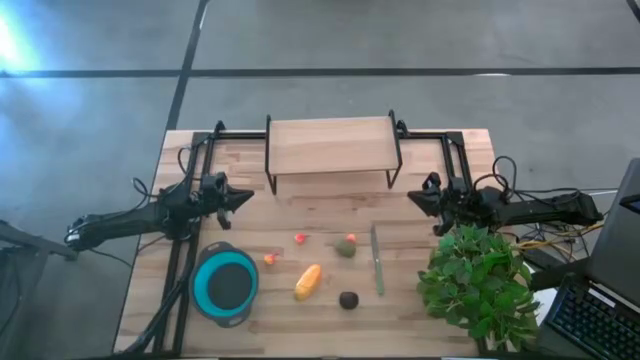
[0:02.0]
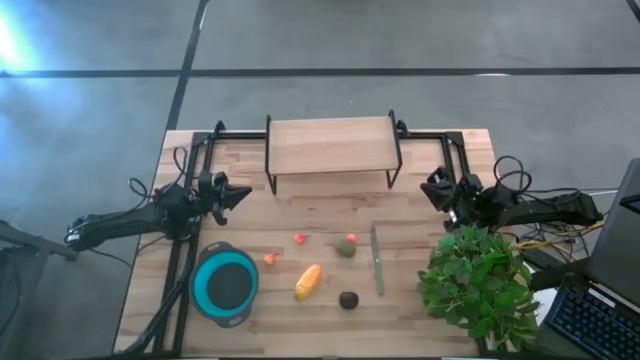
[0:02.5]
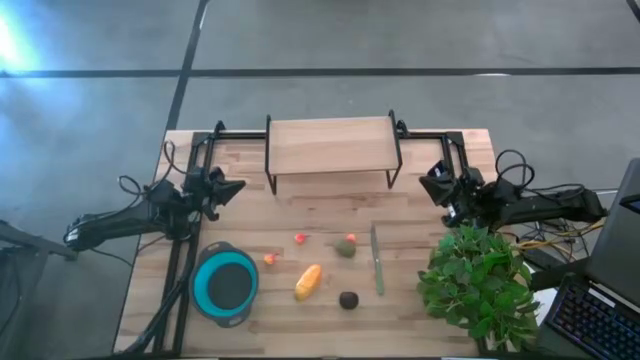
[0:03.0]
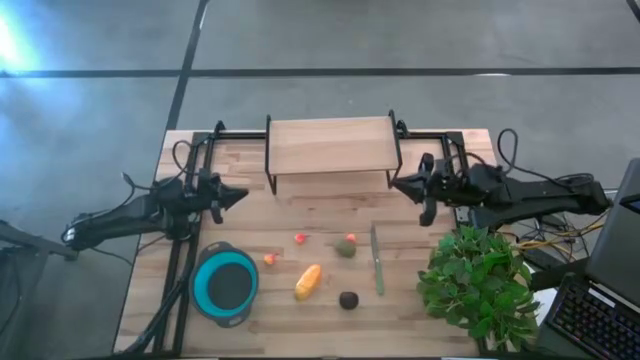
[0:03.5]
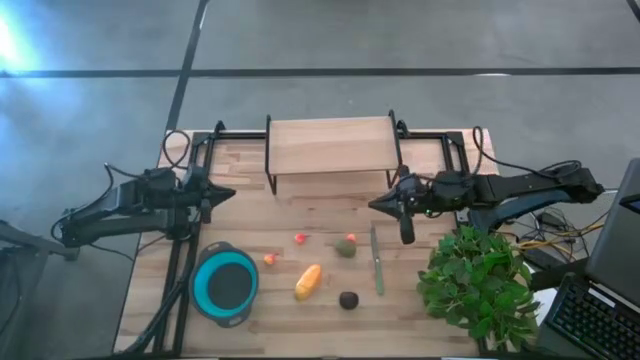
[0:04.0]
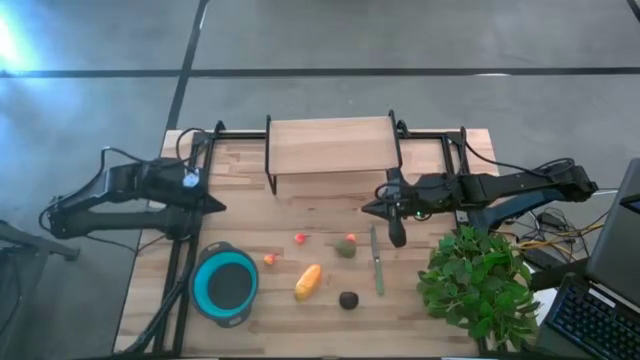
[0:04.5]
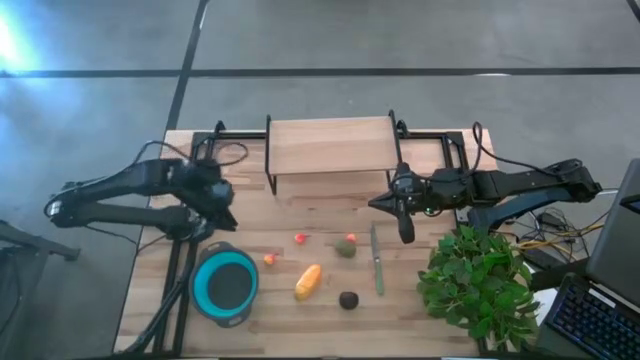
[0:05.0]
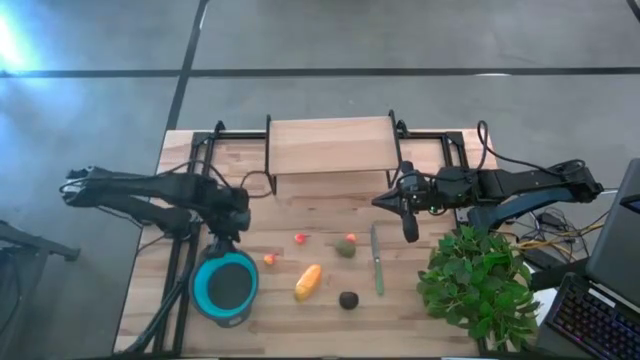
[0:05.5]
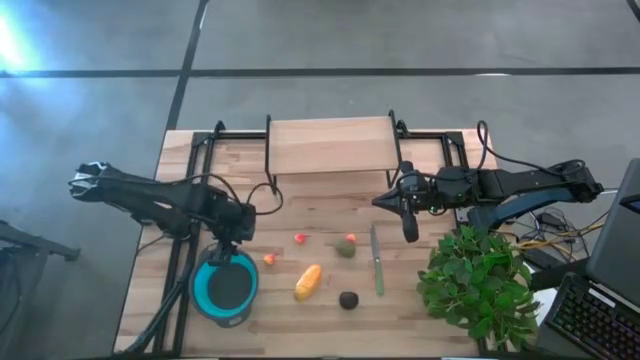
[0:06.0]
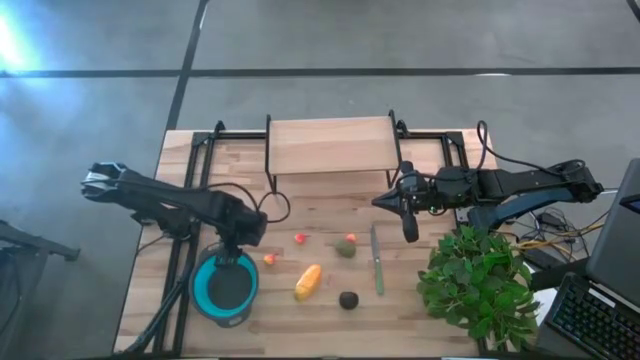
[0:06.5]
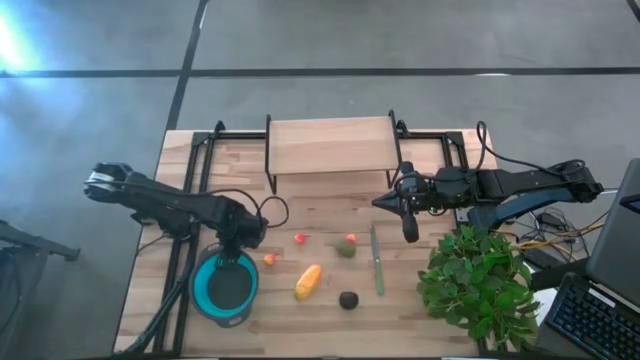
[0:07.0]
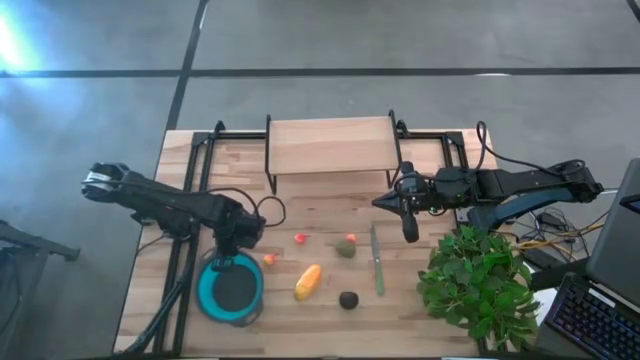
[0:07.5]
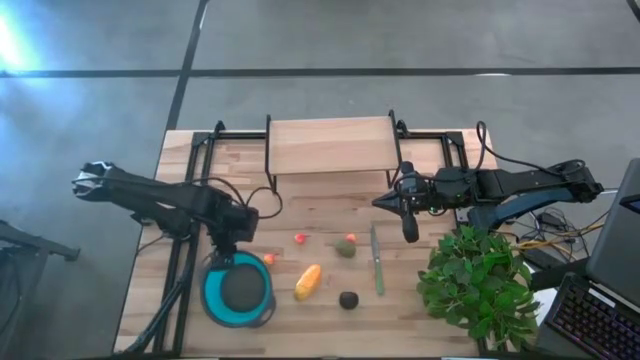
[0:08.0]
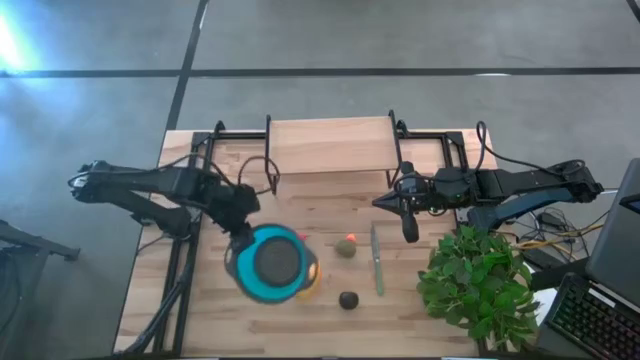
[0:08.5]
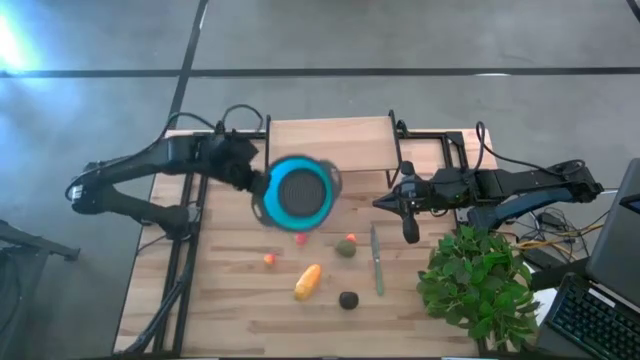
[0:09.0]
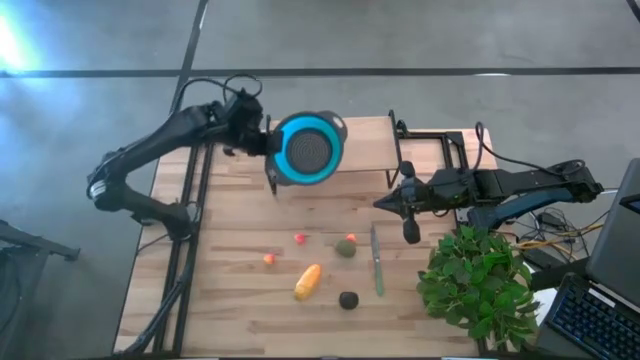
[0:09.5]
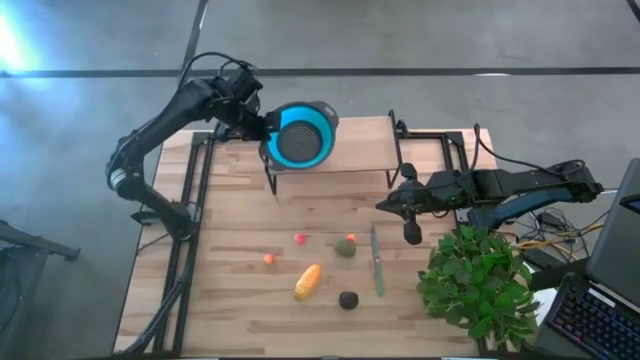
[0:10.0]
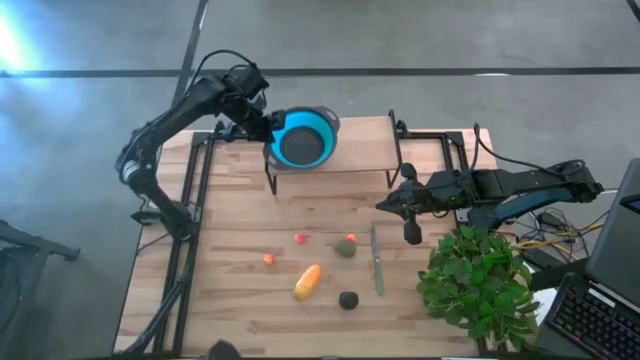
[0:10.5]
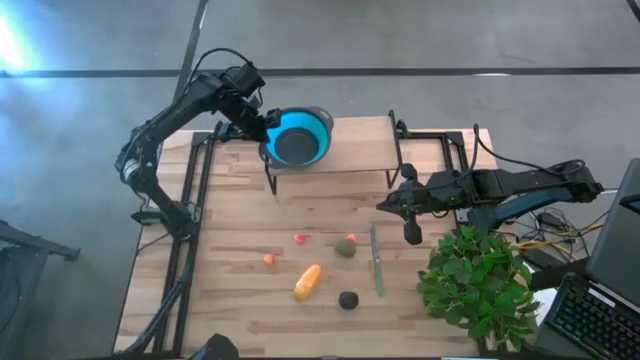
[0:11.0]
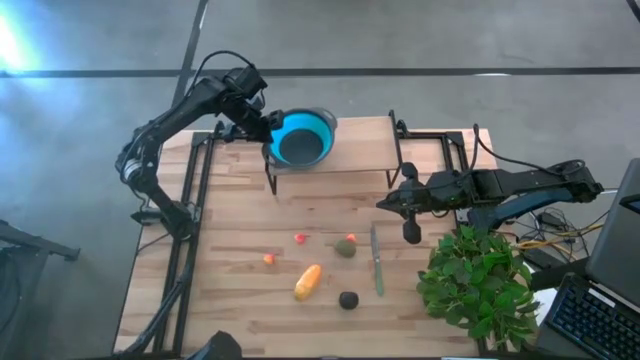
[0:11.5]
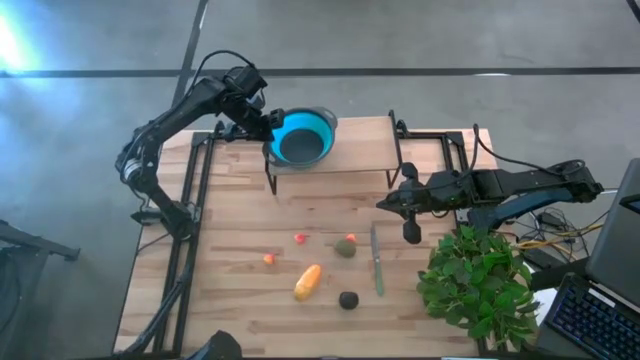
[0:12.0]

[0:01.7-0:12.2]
Task: Pick & Place Fruit
Put the blue strainer bowl on the shelf

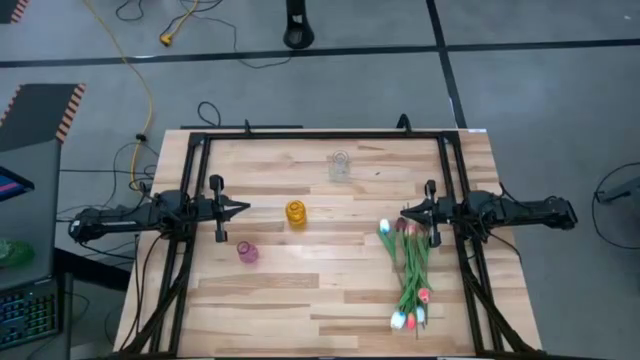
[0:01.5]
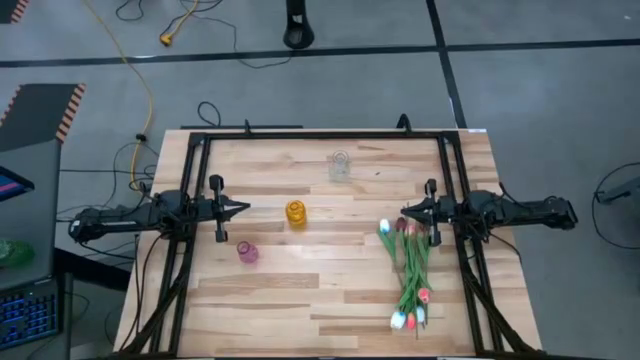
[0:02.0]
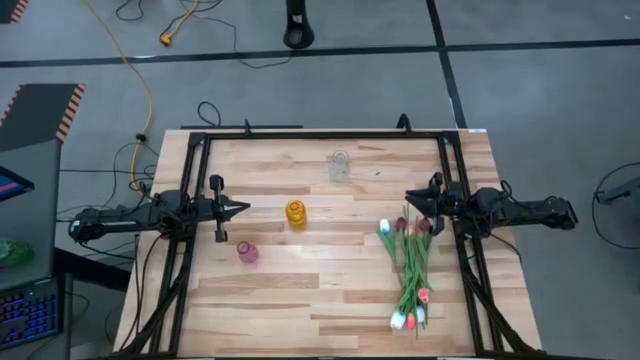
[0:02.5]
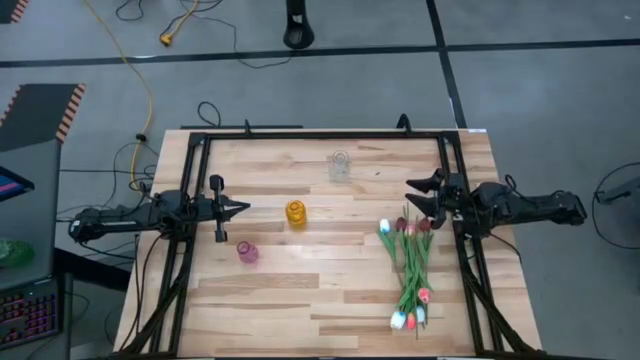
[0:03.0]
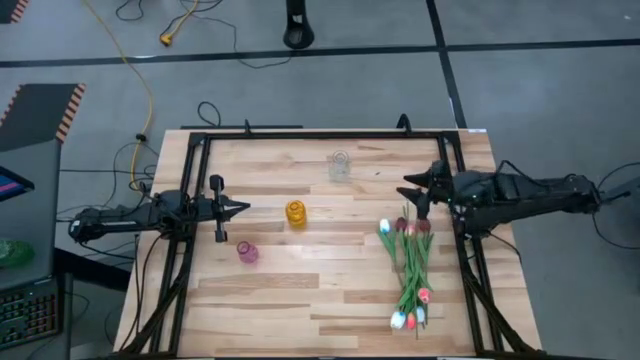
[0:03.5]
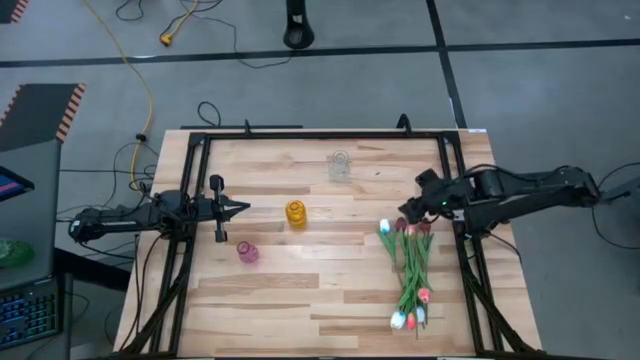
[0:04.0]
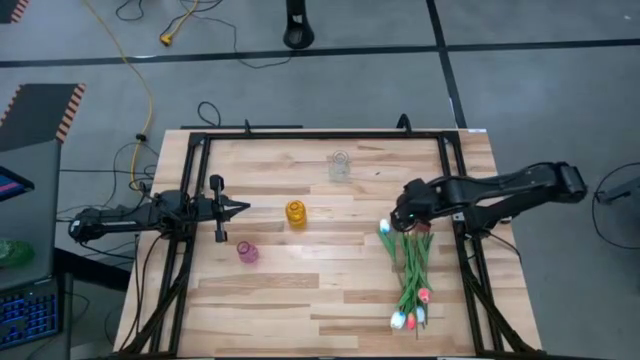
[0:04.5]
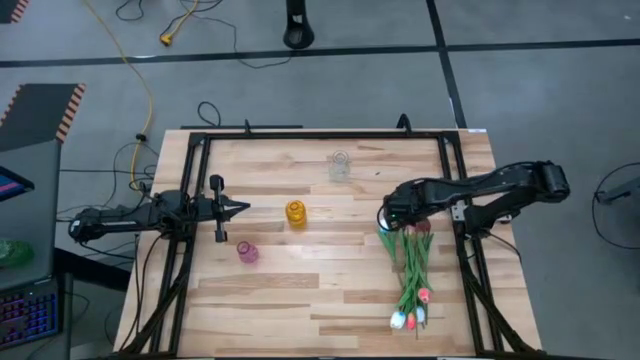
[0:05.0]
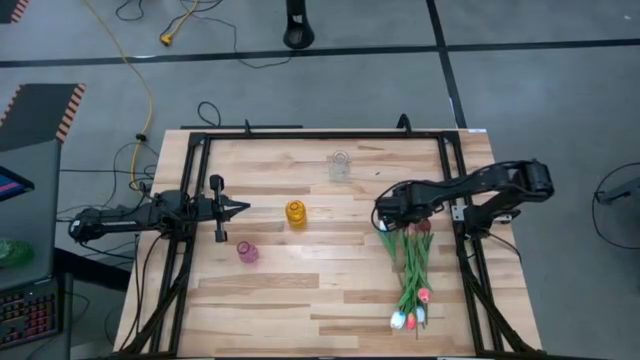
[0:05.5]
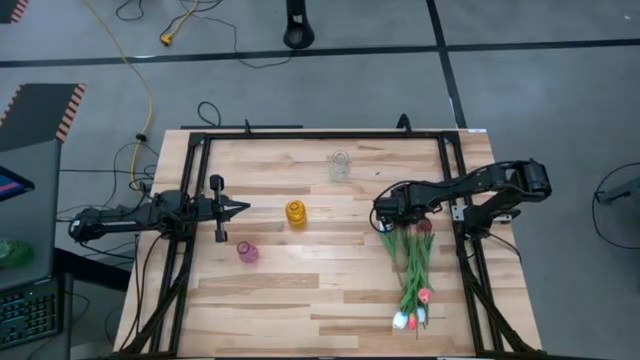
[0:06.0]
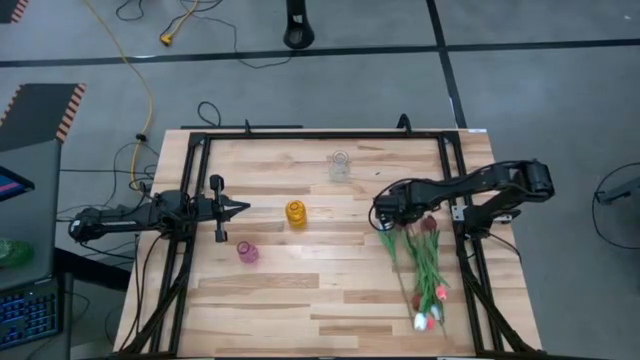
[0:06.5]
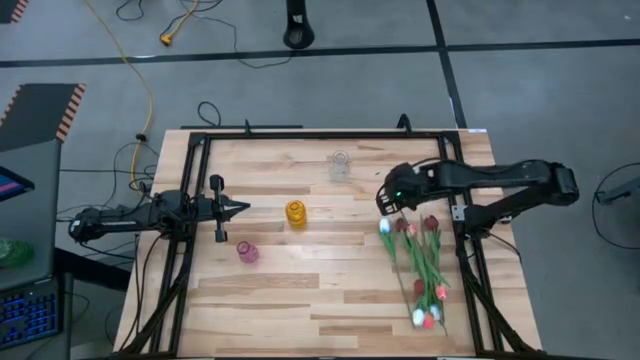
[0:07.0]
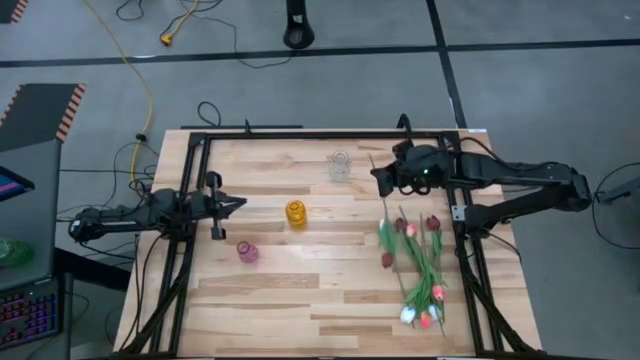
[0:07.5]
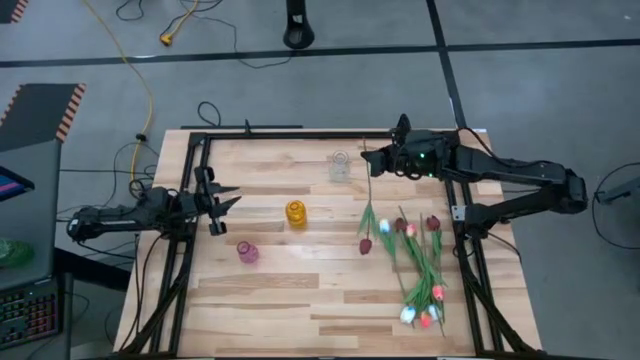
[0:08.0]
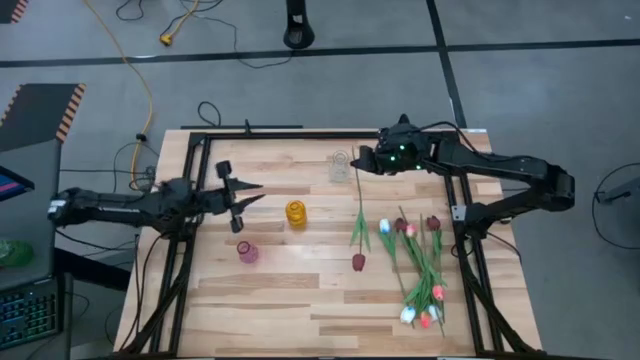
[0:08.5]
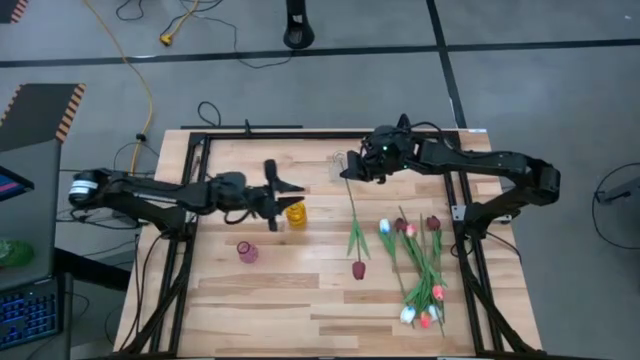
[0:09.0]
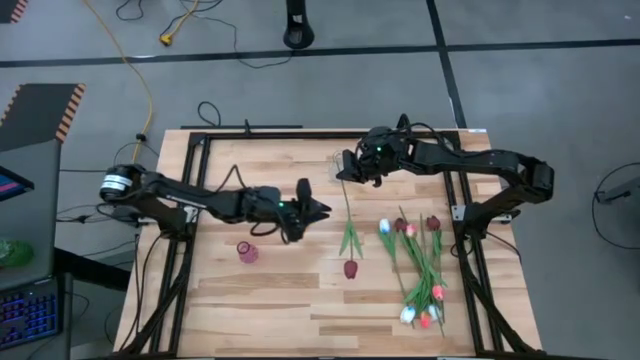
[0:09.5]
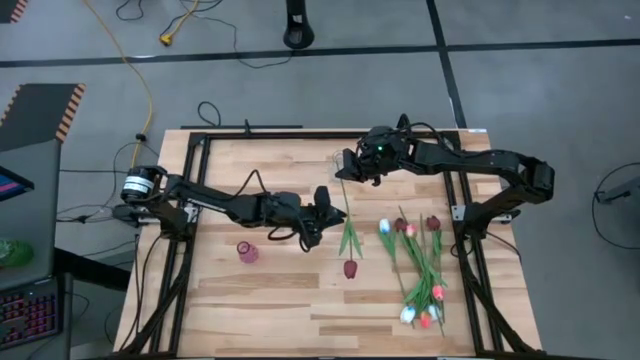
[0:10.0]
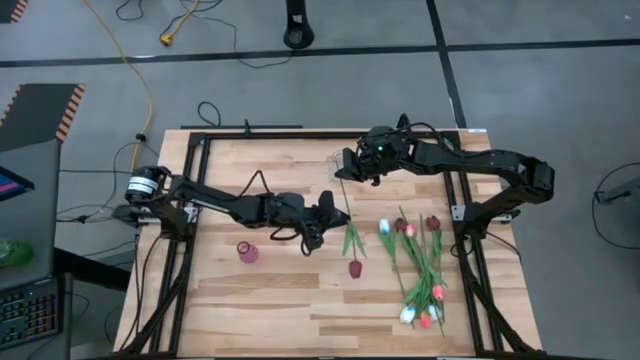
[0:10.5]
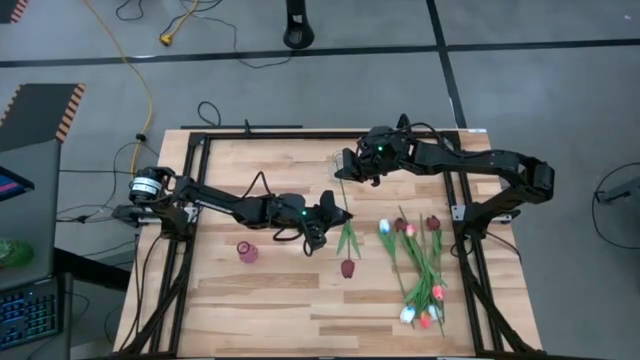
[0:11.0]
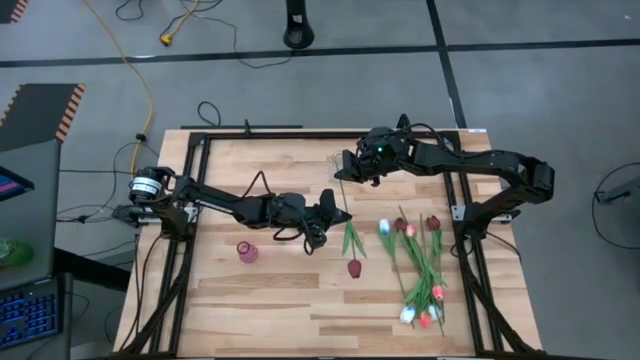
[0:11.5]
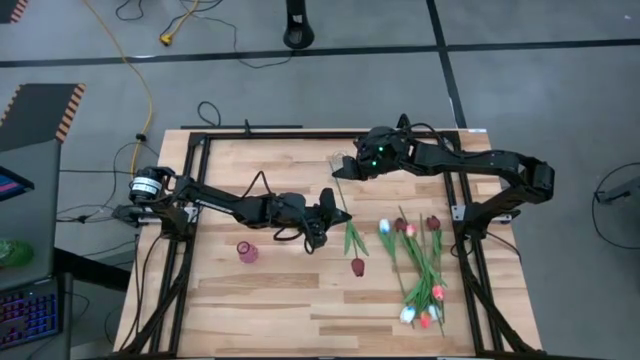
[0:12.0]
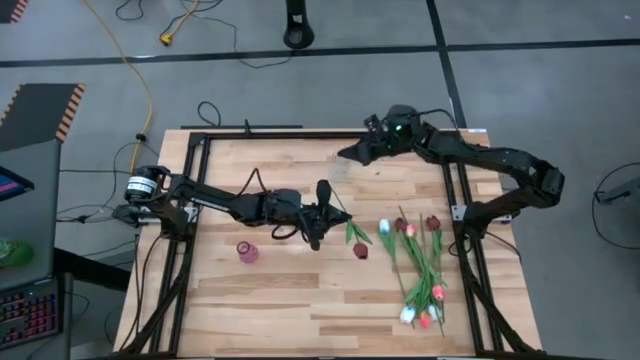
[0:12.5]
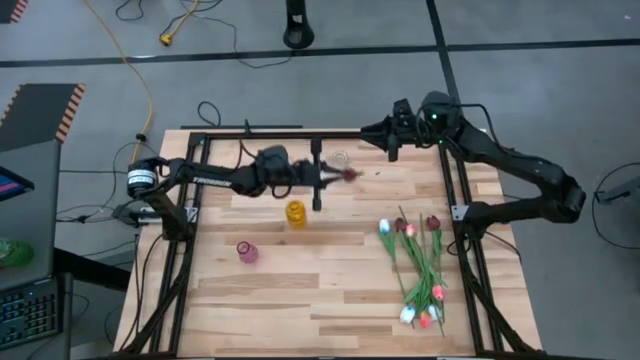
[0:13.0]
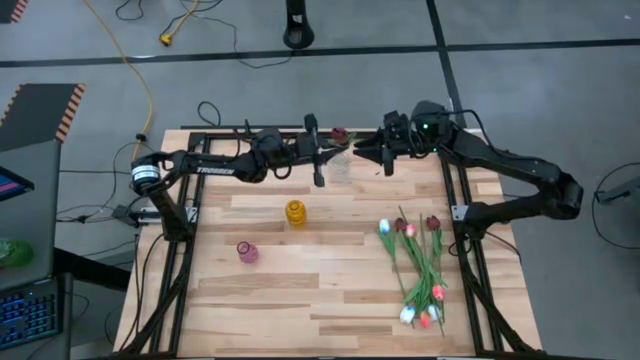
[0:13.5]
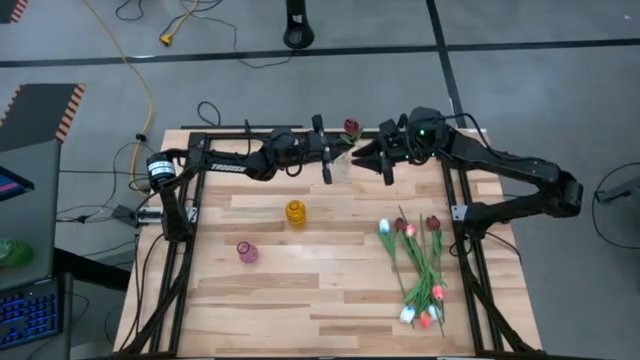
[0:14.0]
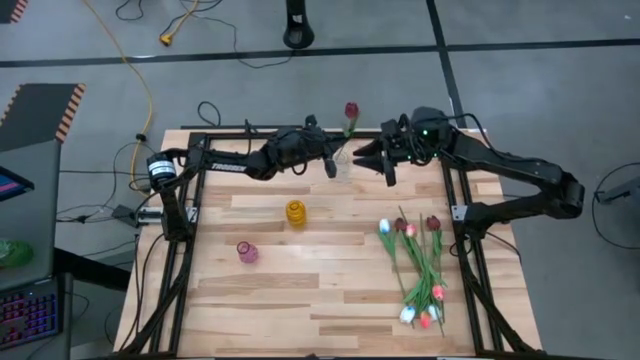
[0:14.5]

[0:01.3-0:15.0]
Task: Sort flowers into vase by color
Put the red flower into the transparent vase
